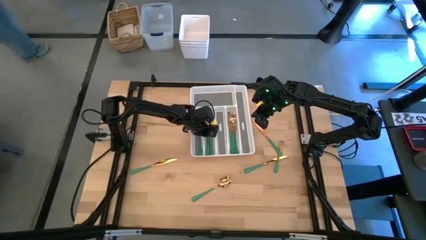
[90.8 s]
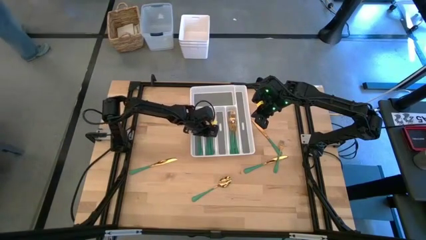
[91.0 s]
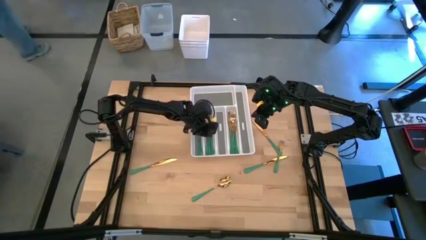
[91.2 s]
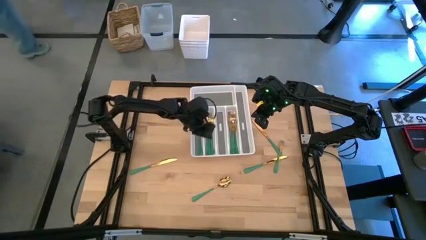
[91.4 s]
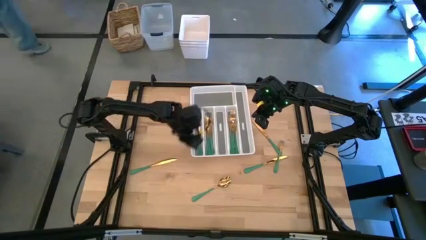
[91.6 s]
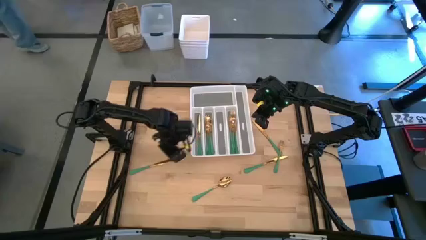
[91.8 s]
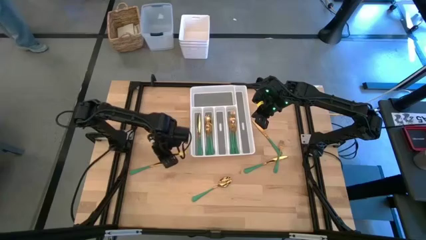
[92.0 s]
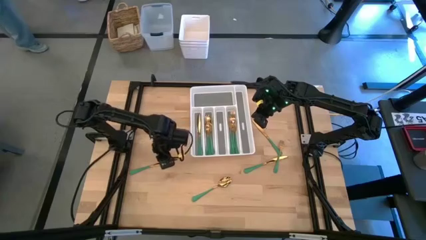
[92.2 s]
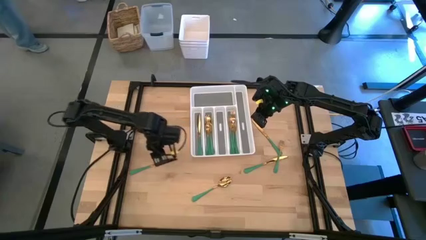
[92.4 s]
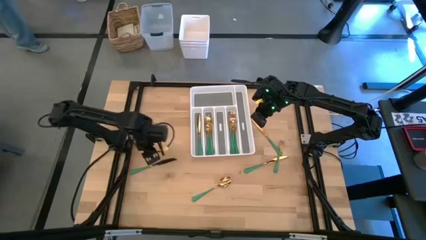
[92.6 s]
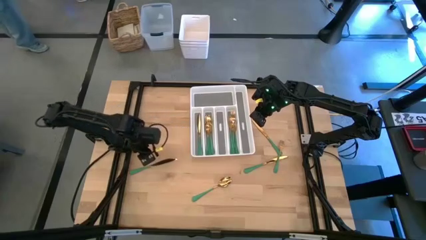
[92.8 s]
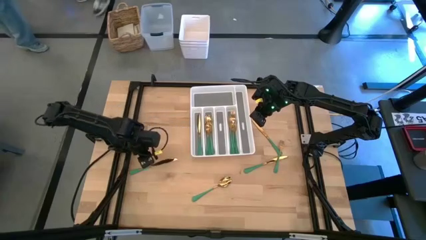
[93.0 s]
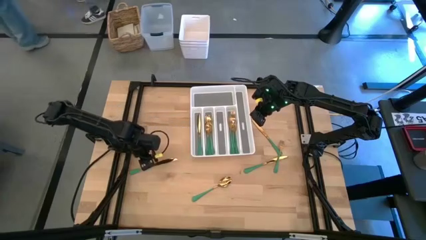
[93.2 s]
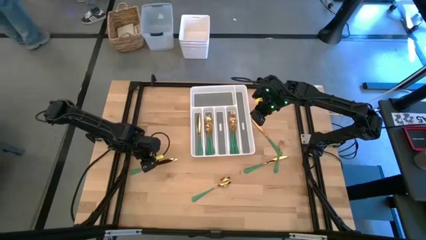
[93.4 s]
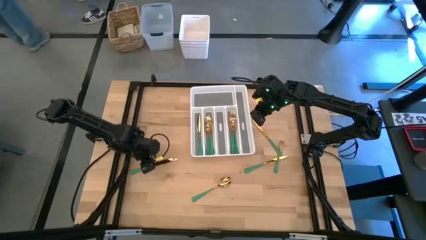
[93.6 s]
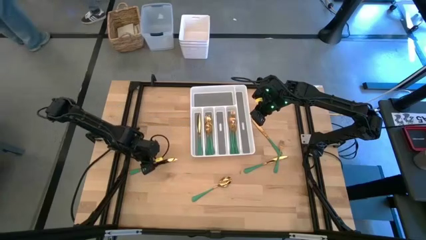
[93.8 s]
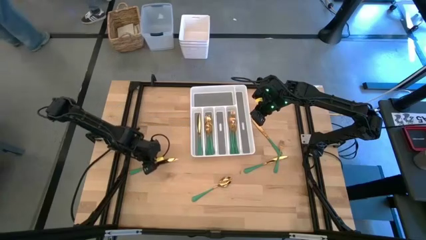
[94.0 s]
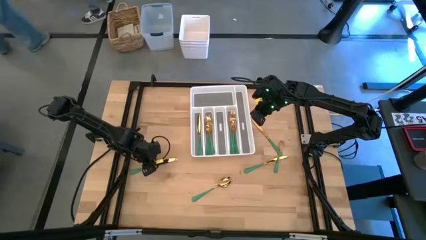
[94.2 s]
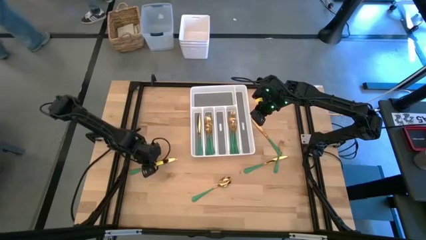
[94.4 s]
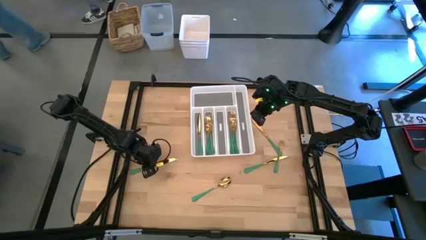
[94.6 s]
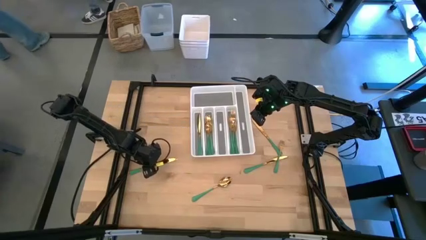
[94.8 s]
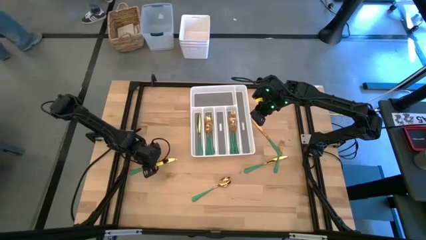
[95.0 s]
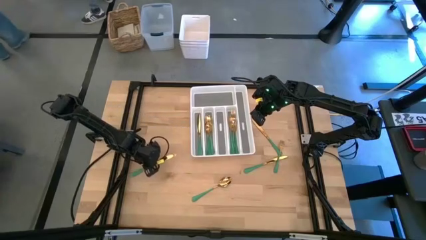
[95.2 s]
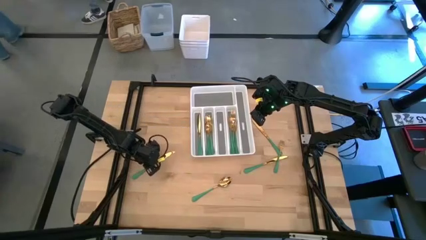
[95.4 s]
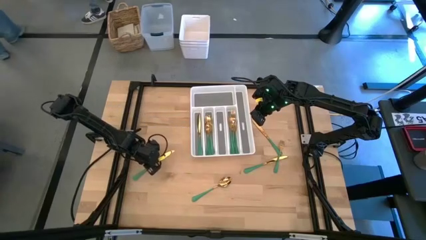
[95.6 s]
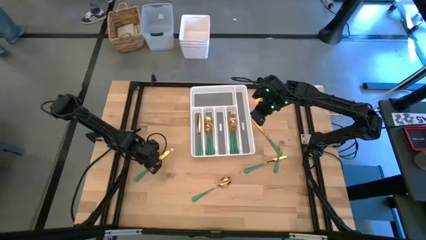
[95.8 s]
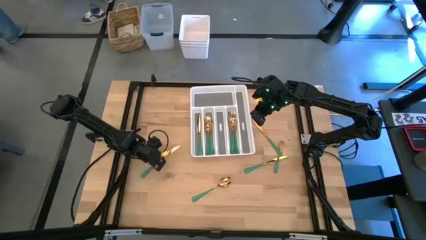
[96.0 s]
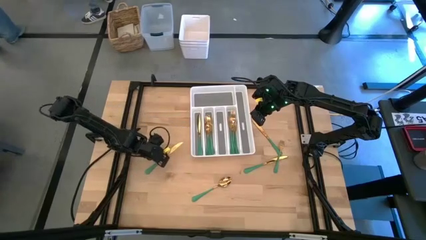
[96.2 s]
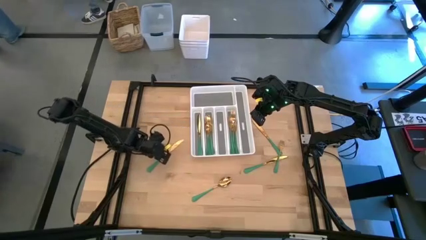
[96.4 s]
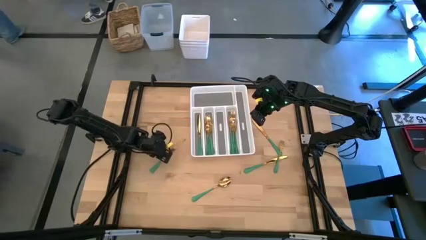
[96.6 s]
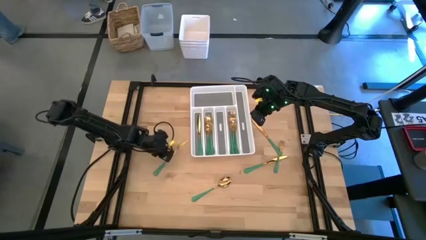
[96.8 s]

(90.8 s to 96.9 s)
Task: Sort silverware
Put the bottom left knife into the silverware organizer

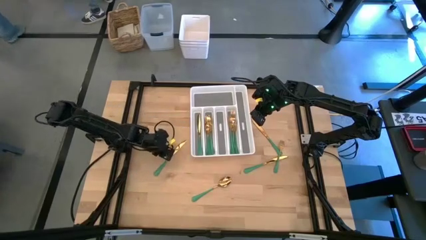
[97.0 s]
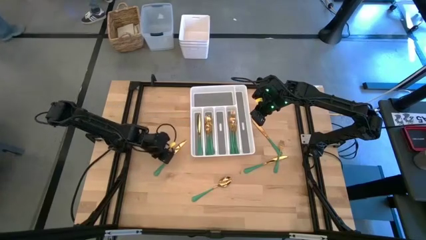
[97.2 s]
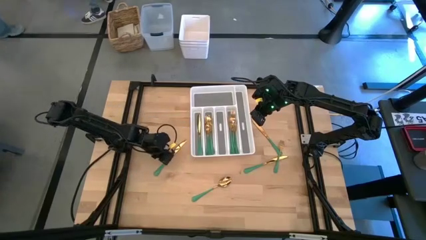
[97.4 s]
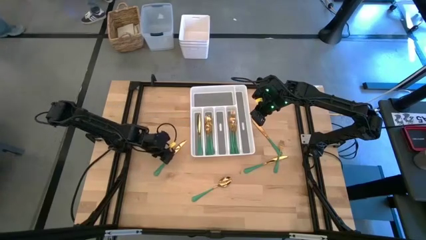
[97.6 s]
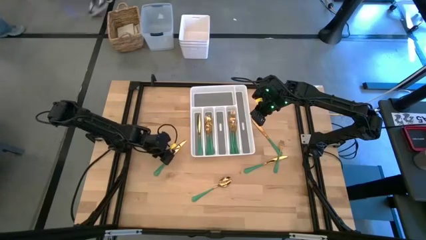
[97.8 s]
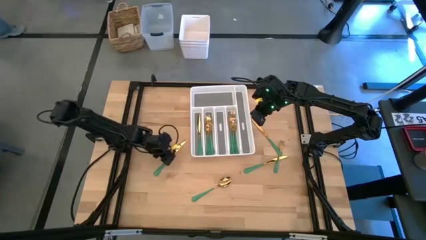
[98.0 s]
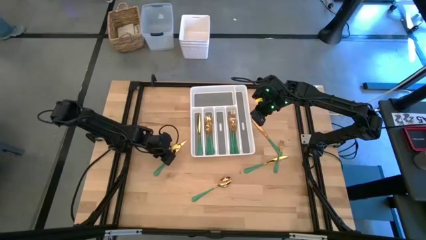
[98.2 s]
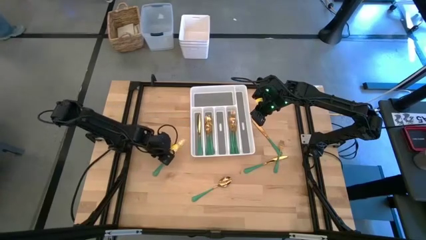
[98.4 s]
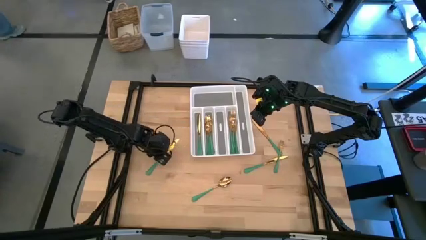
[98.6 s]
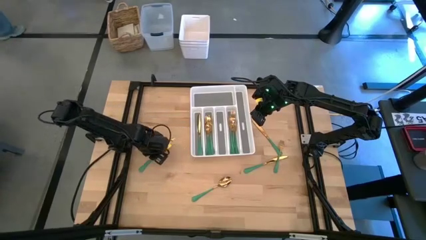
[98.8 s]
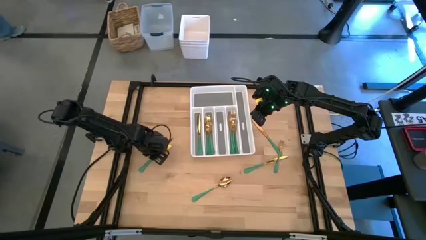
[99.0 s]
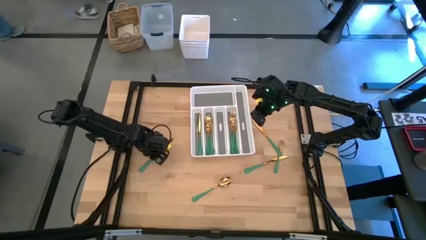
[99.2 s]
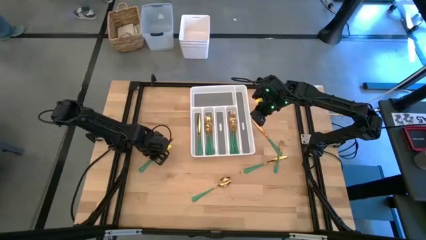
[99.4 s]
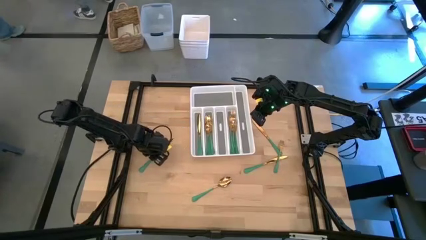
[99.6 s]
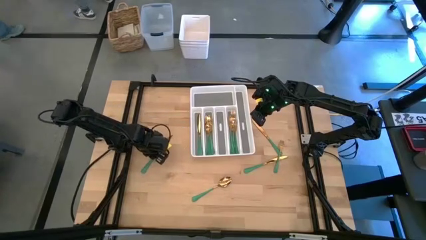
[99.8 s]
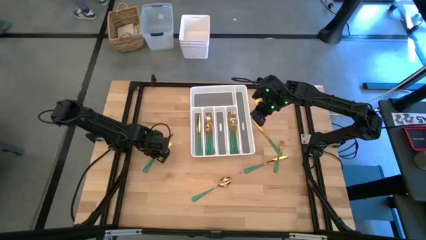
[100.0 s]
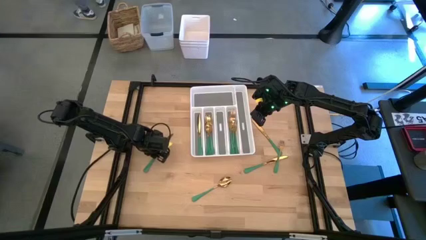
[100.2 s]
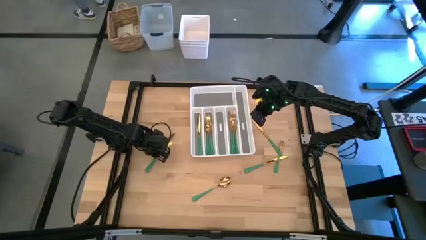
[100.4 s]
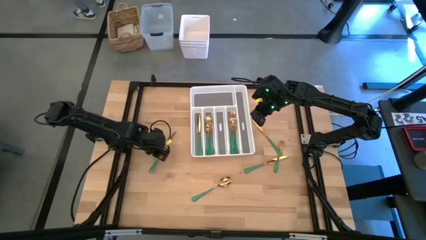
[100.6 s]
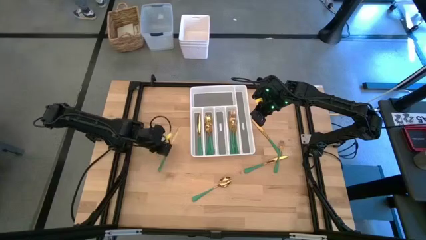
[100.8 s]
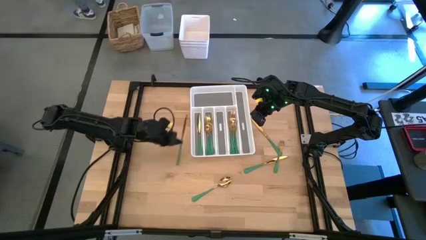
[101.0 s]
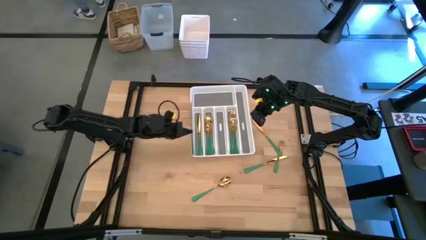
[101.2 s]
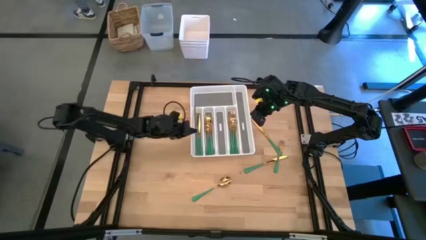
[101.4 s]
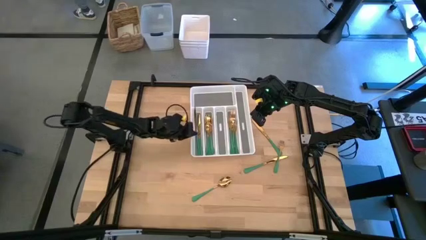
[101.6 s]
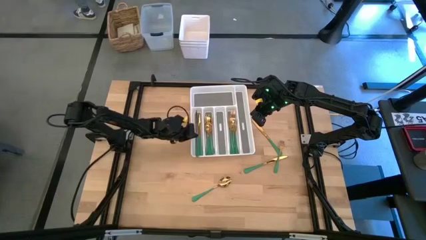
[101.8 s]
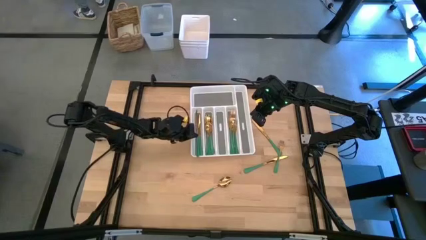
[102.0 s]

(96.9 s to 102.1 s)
Put the bottom left knife into the silverware organizer

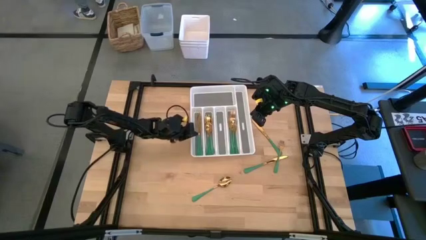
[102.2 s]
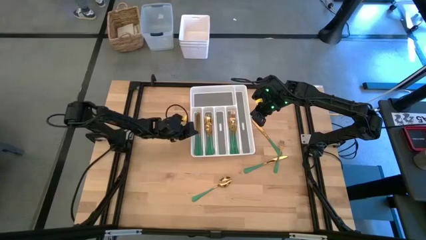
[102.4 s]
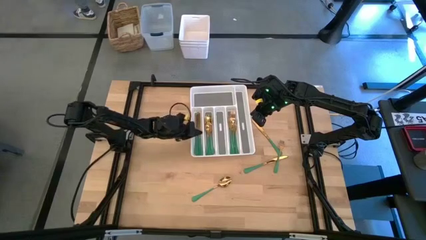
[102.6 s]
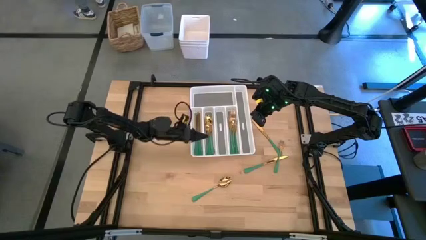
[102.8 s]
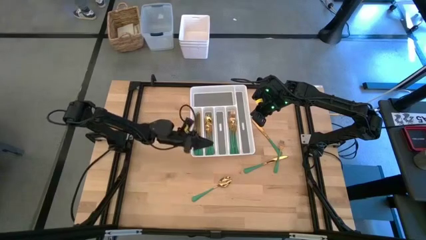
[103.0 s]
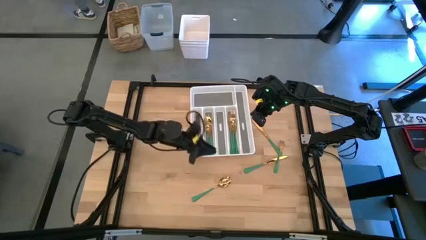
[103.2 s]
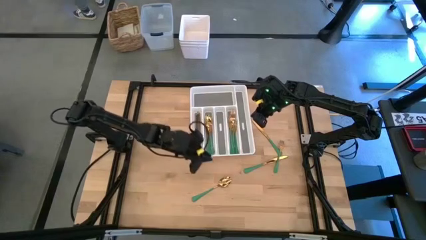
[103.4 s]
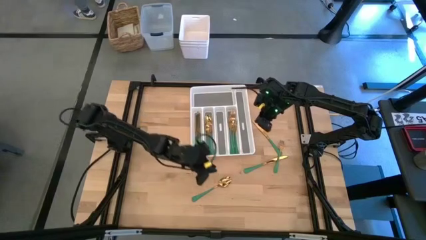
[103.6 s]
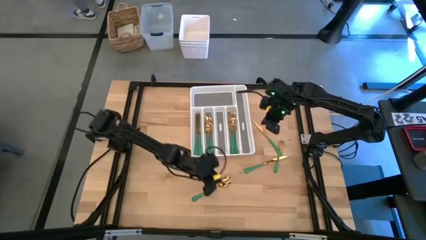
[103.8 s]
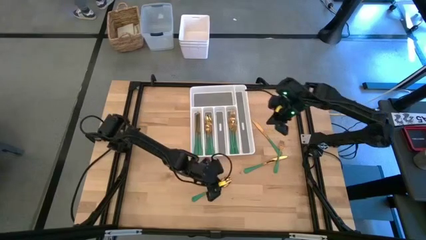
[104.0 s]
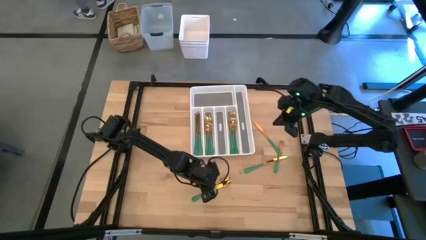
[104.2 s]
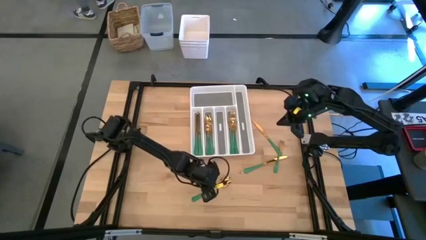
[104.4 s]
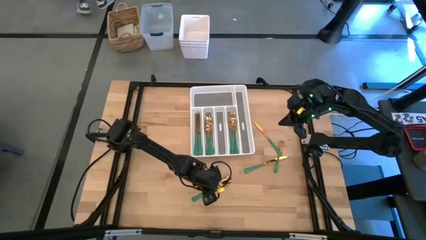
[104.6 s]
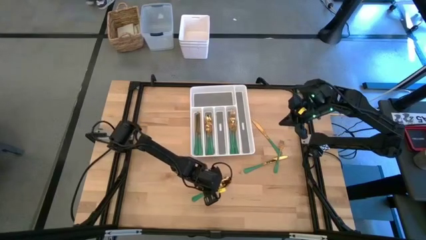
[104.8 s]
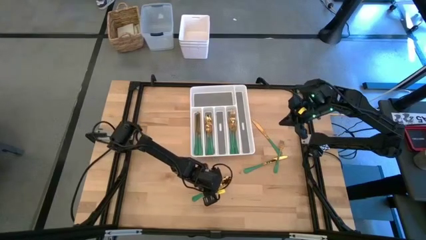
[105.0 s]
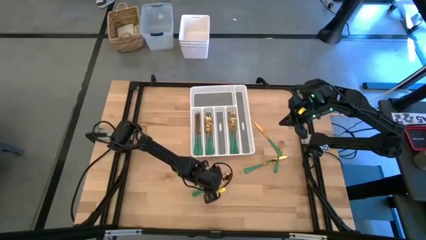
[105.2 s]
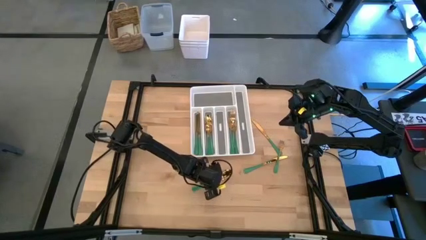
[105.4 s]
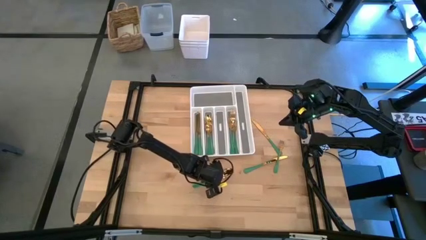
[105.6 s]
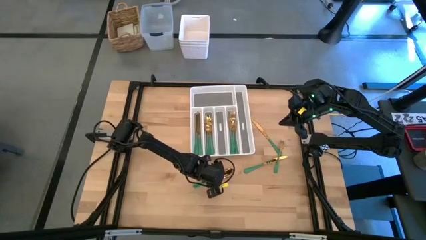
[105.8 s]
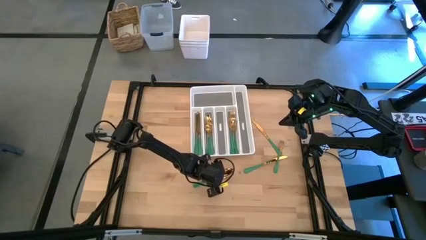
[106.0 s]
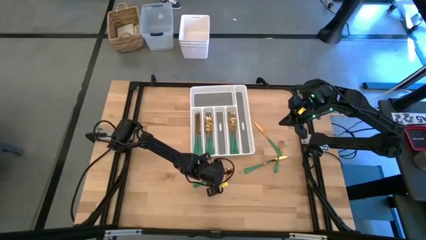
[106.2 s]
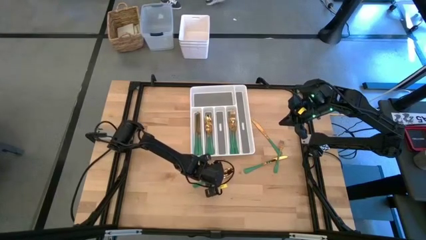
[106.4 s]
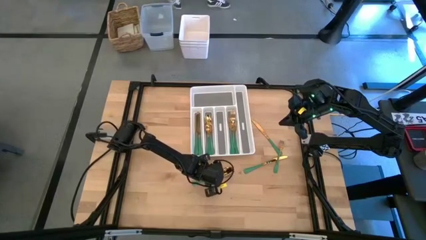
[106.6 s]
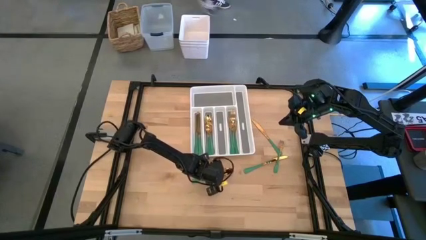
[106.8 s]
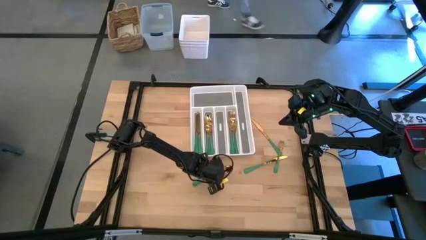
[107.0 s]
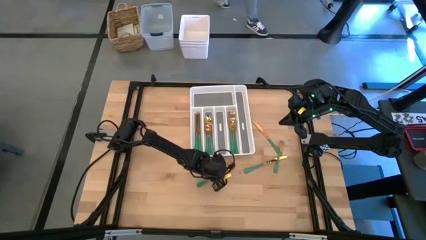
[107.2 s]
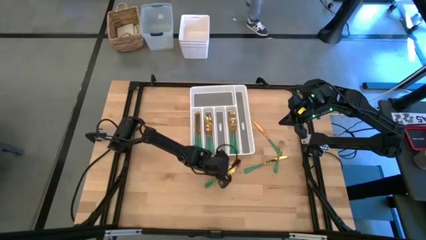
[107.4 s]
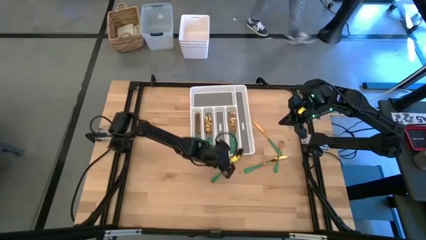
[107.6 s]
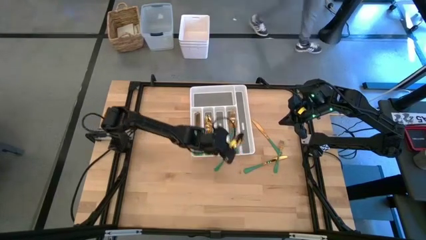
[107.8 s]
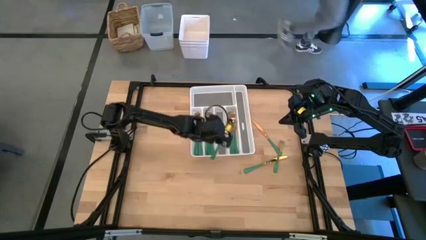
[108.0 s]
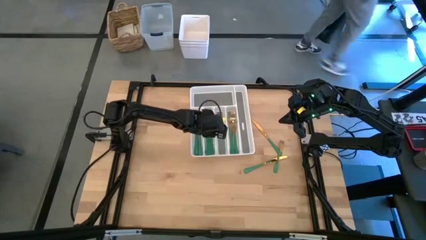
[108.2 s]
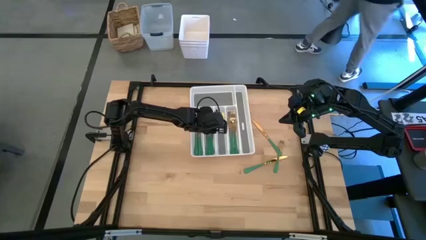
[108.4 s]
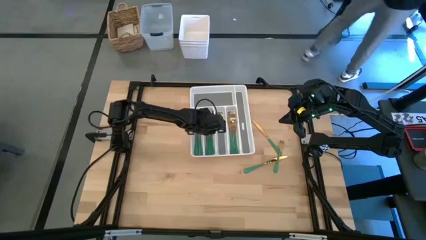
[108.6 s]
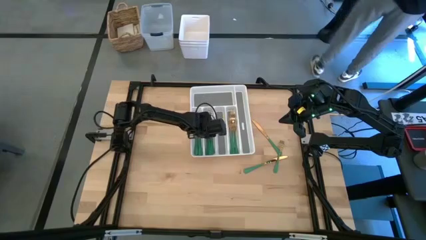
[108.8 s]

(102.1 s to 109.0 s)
Put the spoon into the silverware organizer
